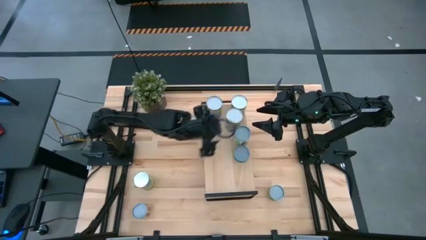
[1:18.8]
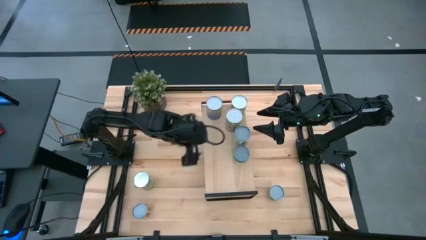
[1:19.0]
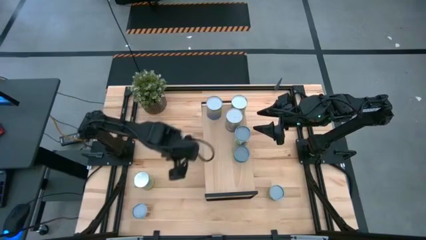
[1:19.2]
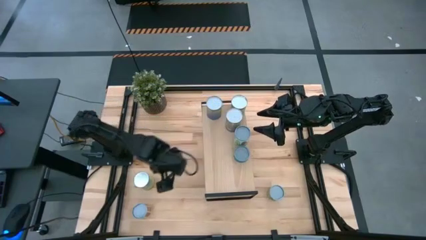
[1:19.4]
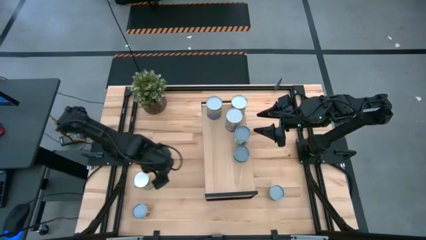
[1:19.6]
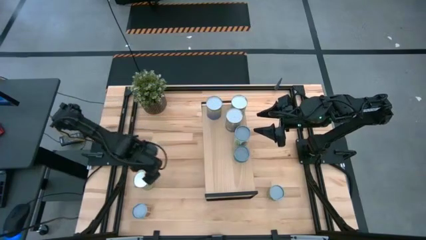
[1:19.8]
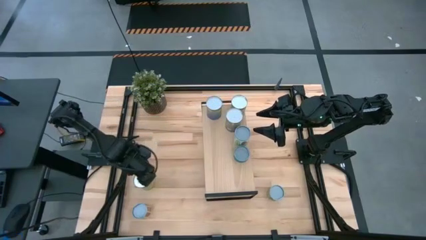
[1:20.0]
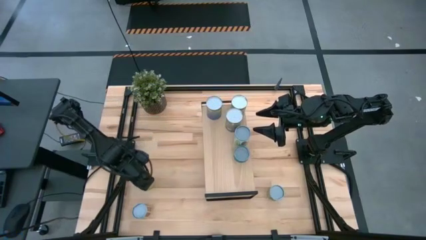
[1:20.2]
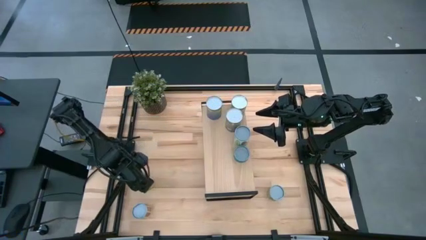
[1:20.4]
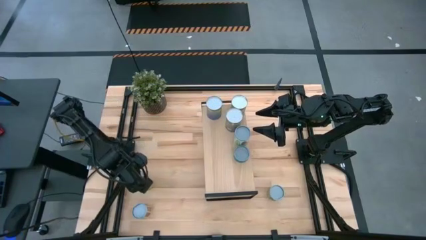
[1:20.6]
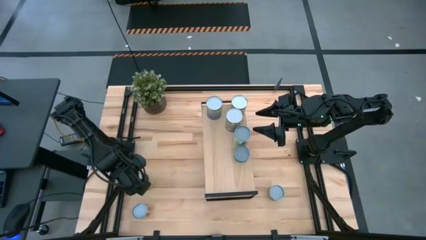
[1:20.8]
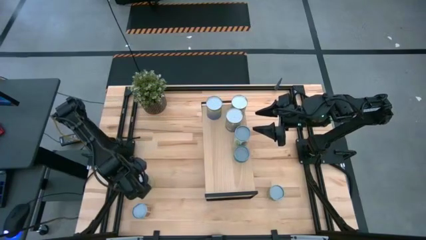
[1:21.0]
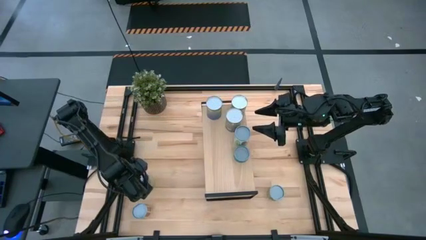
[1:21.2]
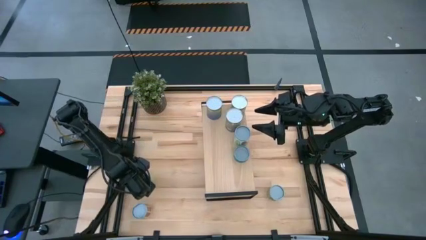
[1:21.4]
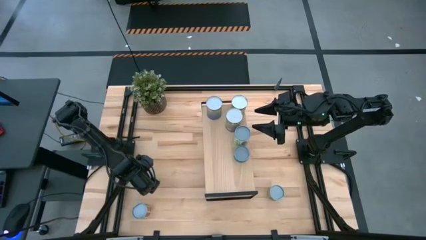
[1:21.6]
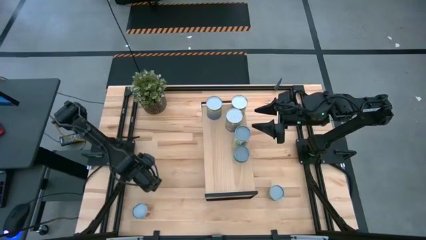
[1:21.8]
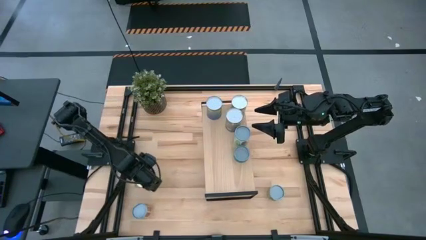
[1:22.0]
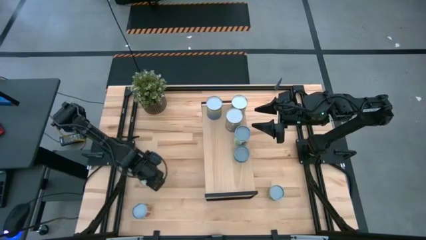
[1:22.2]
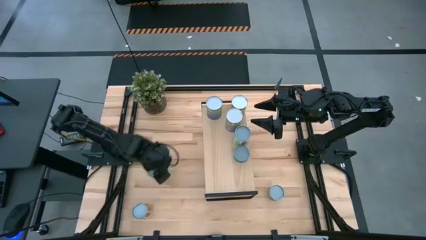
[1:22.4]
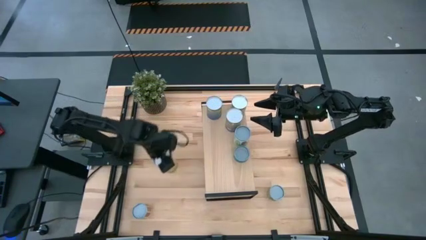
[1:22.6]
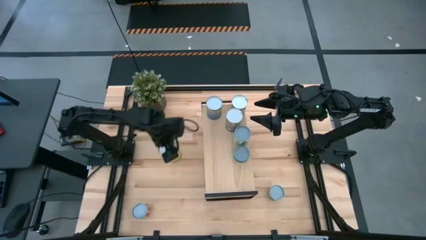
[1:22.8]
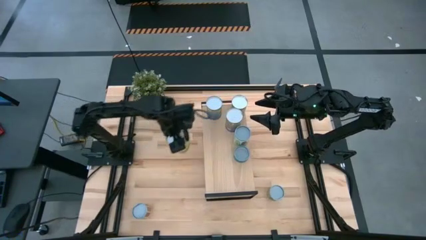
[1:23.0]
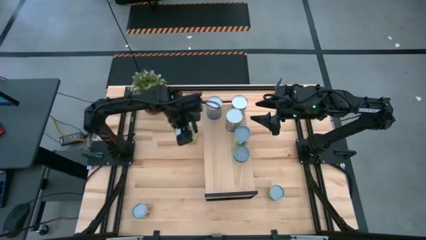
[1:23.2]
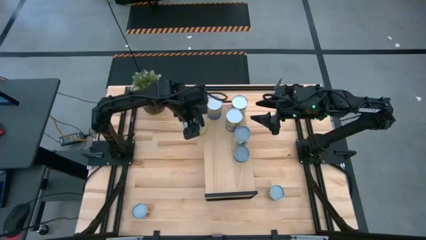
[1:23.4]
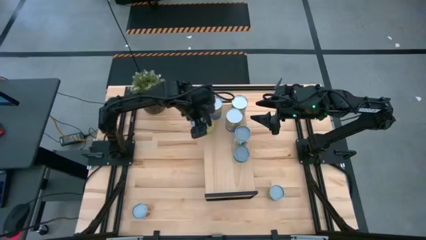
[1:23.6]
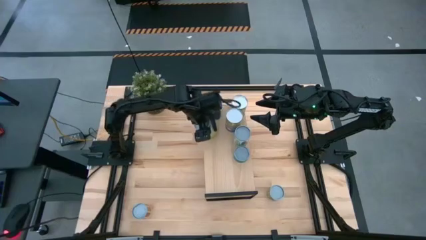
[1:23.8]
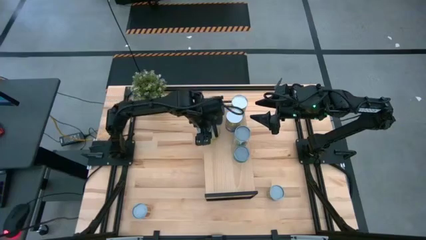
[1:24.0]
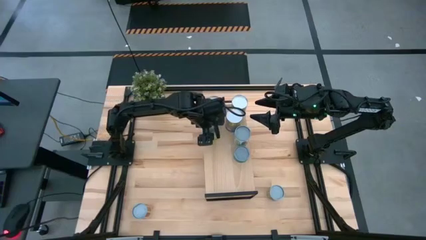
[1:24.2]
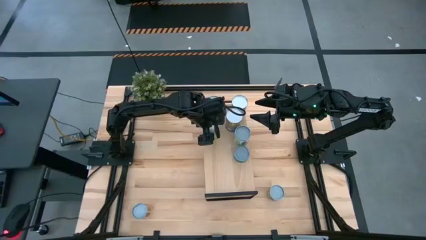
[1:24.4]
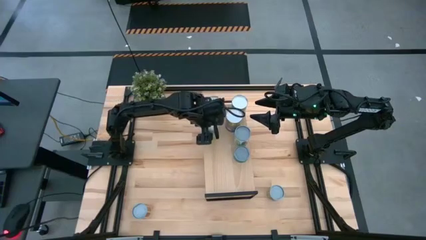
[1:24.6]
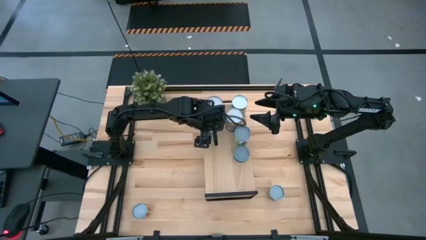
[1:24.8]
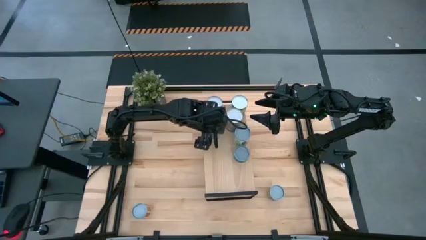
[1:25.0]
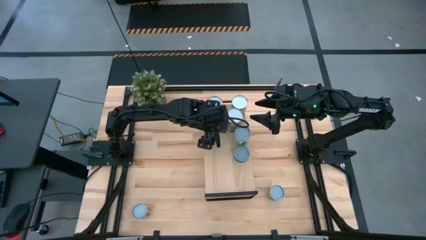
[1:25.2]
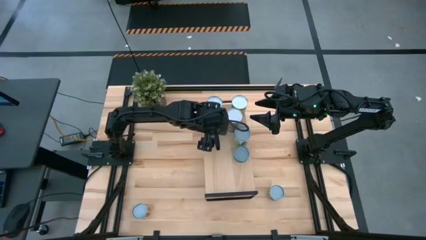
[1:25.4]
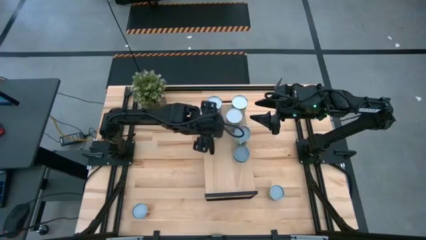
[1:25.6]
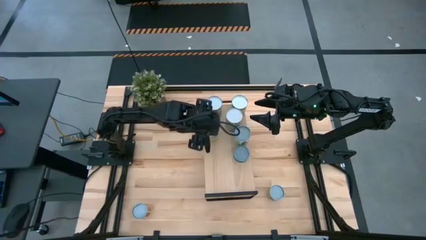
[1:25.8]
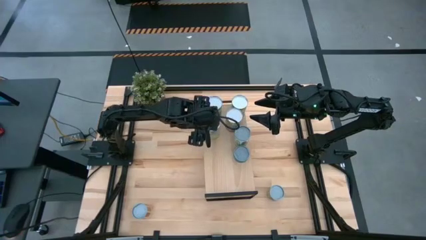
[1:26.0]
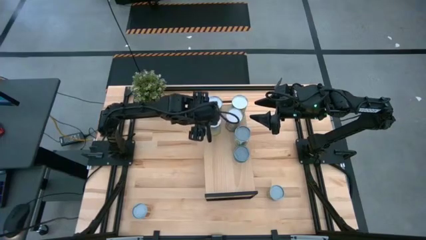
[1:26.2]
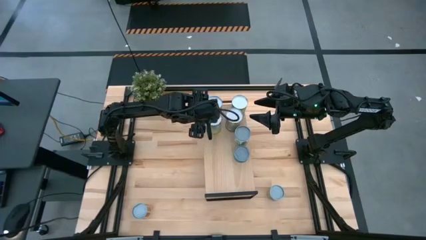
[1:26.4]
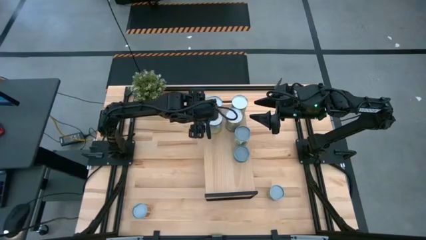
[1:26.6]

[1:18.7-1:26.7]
Task: Pick and place cans onto a shelf
Put the canned carrots on the shelf

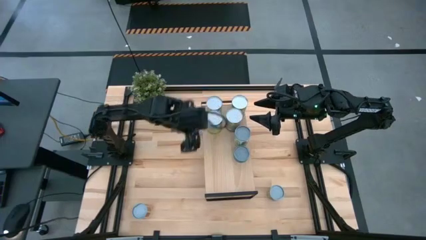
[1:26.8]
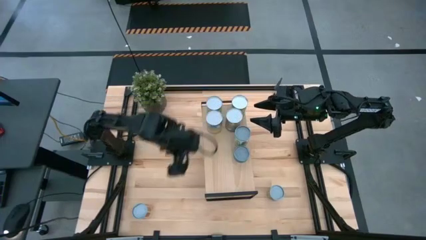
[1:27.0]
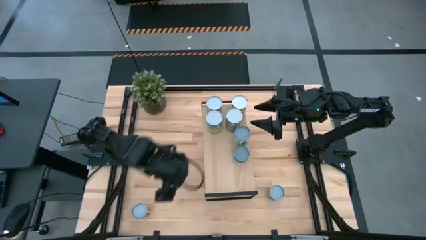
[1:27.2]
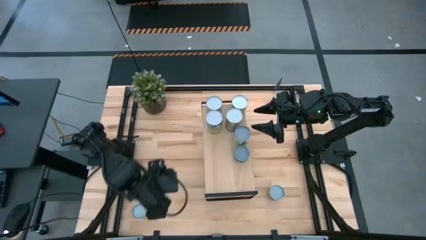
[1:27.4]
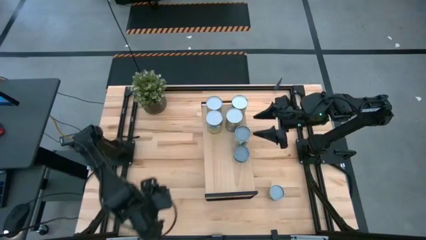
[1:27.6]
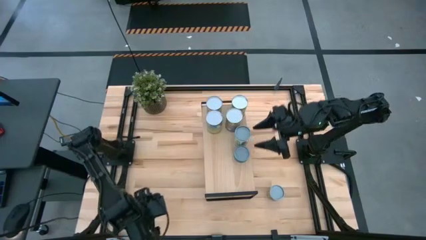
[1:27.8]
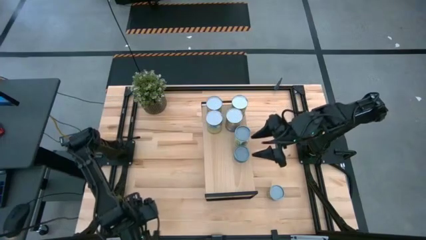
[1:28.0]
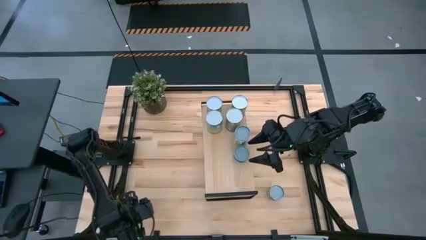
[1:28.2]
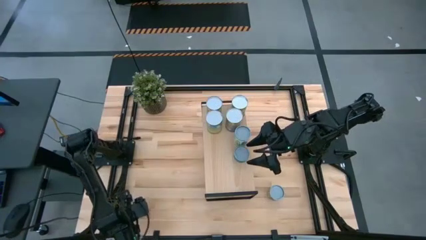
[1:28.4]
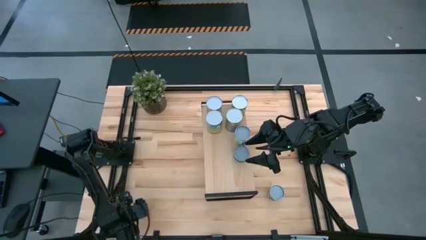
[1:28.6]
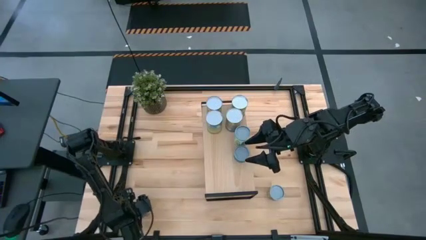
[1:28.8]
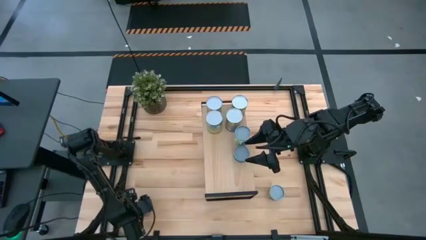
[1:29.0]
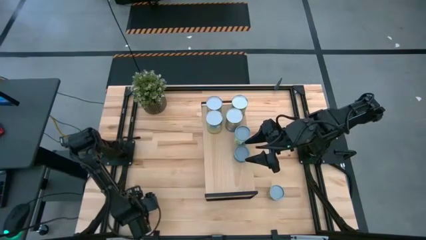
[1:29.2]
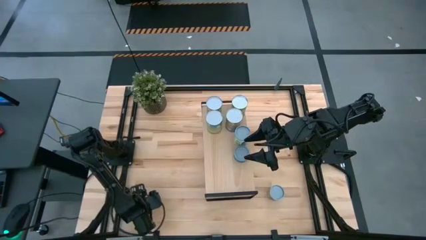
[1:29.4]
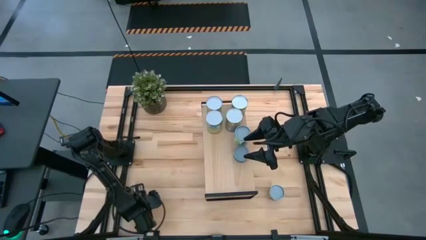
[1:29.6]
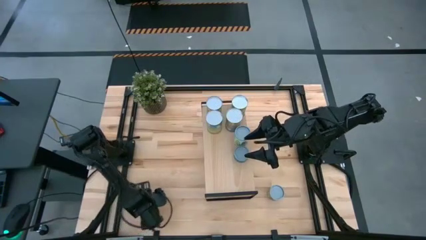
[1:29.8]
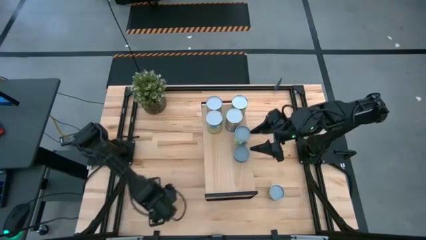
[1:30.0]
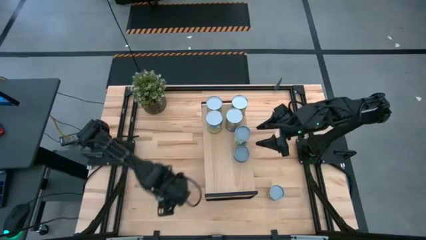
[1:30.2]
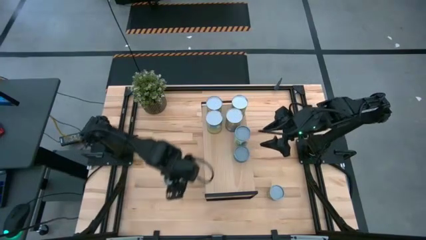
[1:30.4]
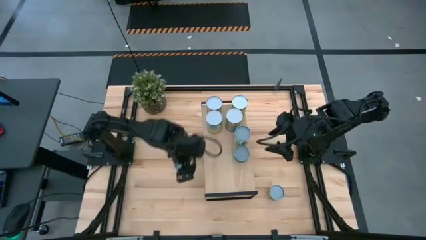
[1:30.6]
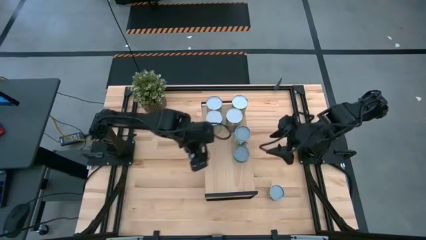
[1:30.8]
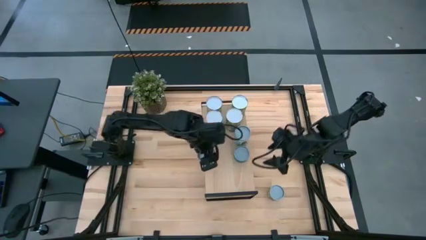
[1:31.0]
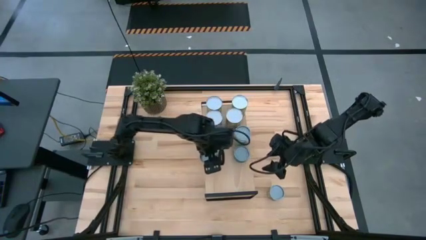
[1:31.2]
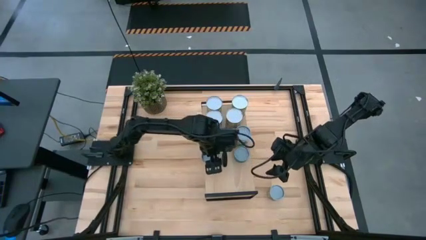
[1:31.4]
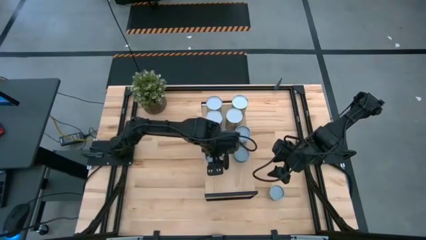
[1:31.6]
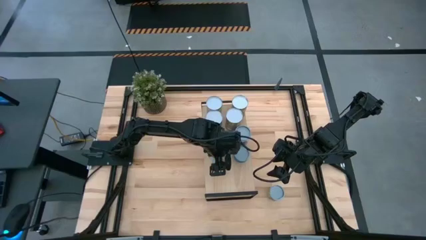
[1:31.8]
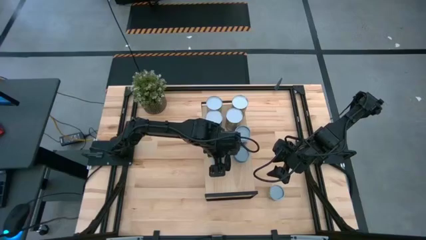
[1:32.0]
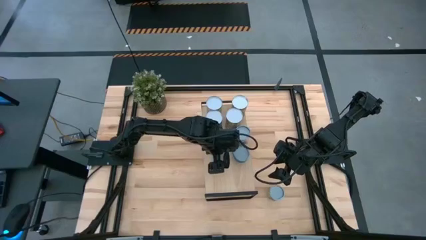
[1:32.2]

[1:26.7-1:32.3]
Put the canned tomatoes on the shelf

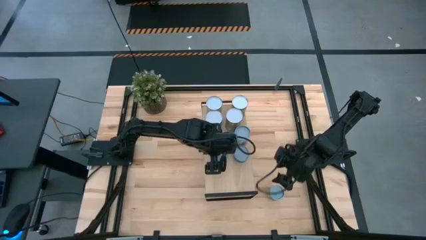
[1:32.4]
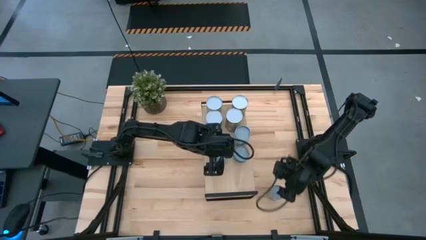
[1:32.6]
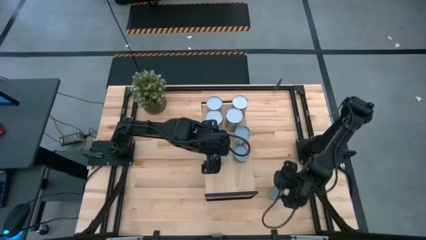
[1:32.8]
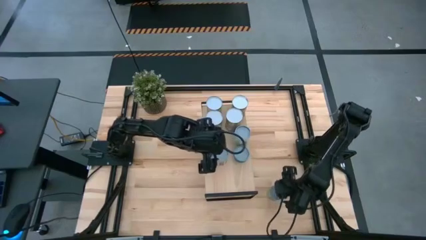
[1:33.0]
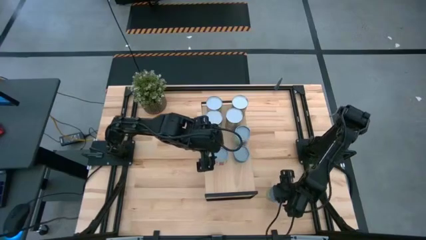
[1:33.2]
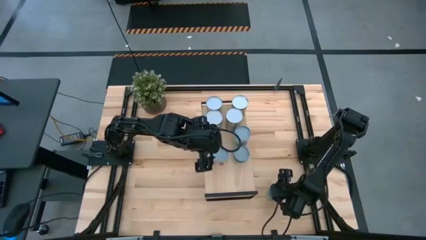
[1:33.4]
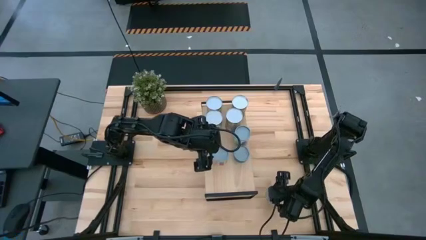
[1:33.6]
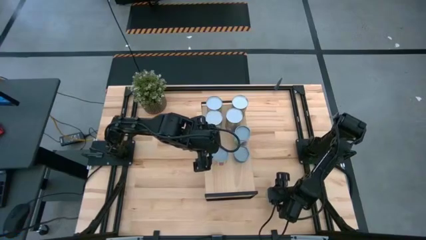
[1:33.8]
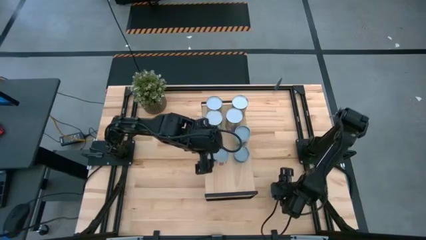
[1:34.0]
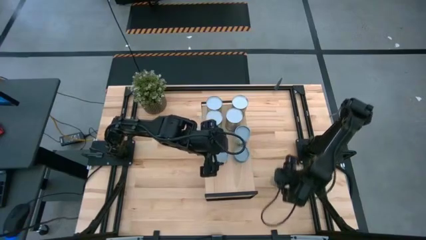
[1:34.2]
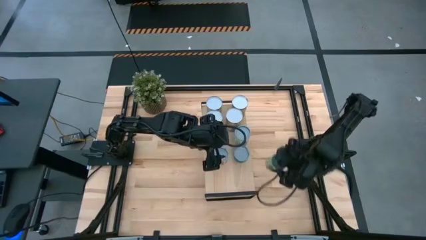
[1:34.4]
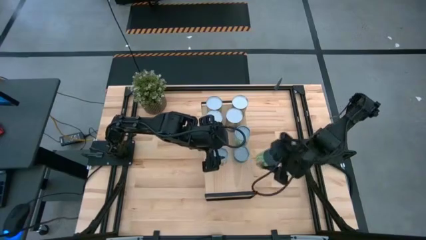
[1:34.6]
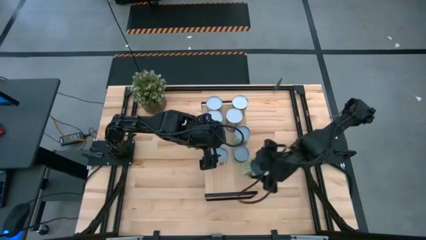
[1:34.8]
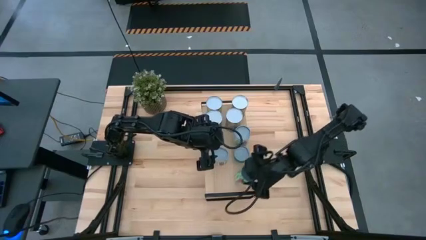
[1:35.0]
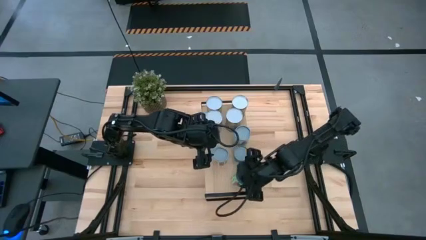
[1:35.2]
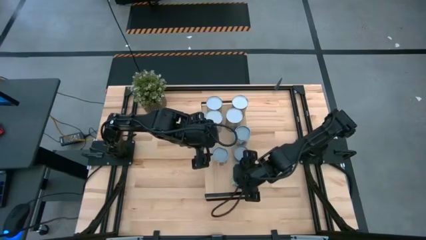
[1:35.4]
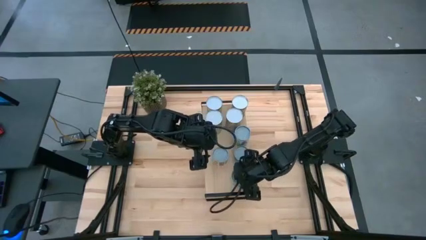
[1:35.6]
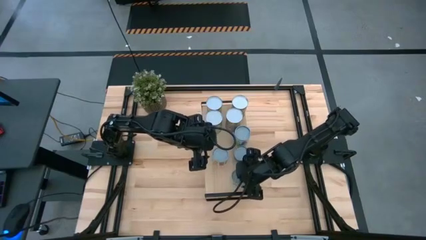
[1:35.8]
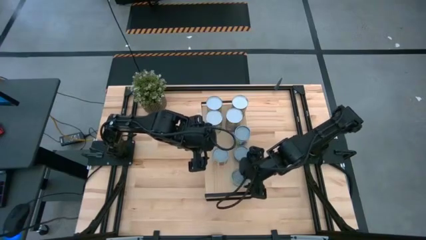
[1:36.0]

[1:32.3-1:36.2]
Put the canned green peas on the shelf
